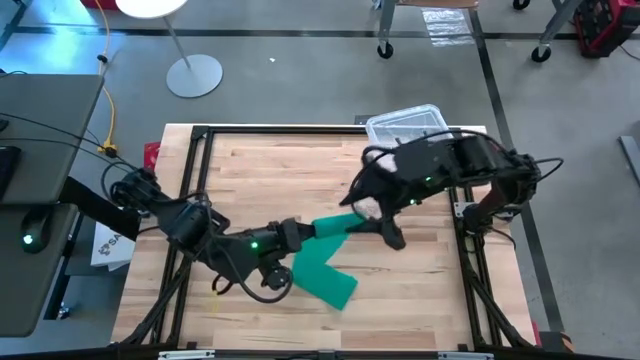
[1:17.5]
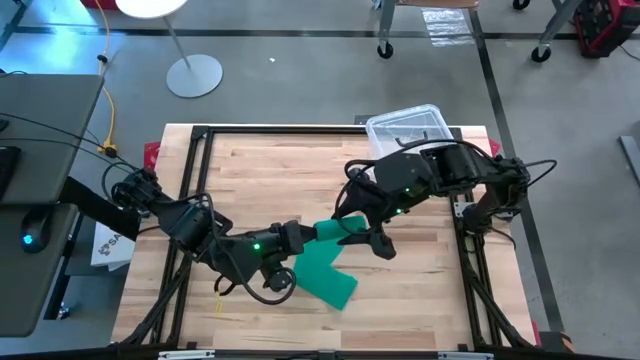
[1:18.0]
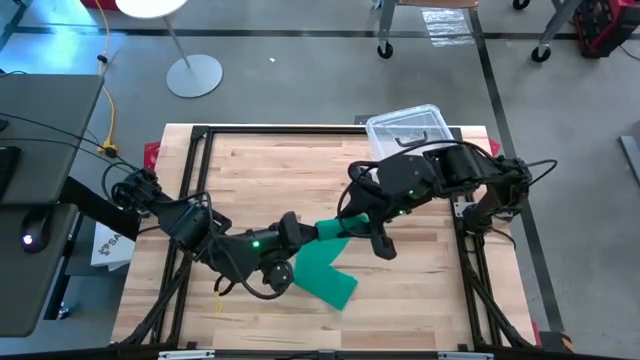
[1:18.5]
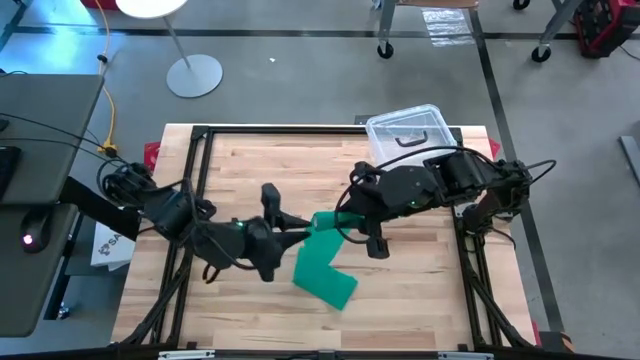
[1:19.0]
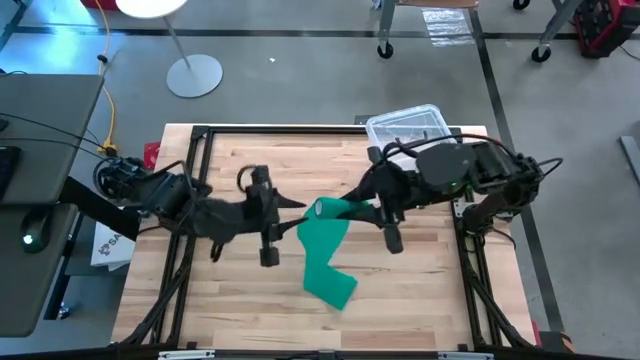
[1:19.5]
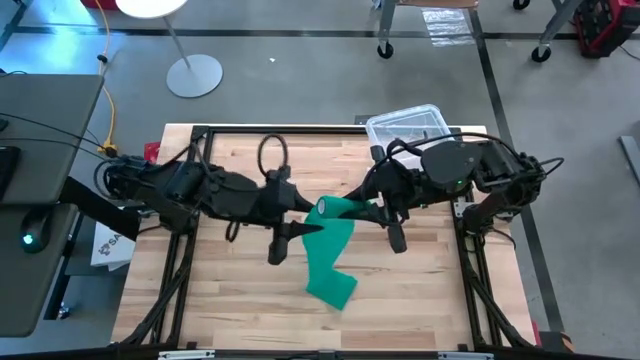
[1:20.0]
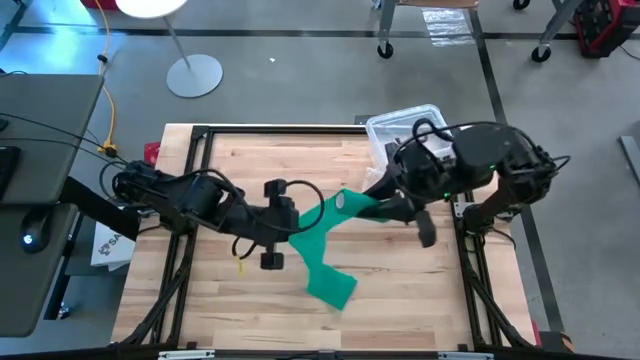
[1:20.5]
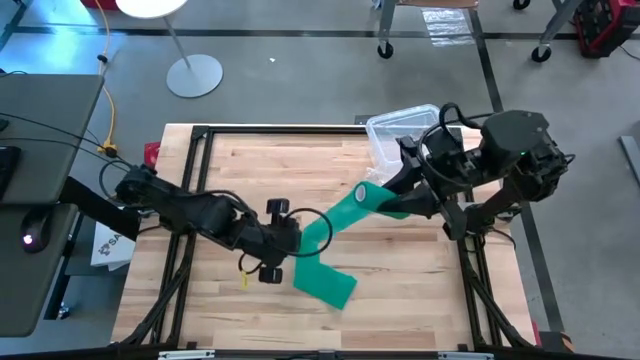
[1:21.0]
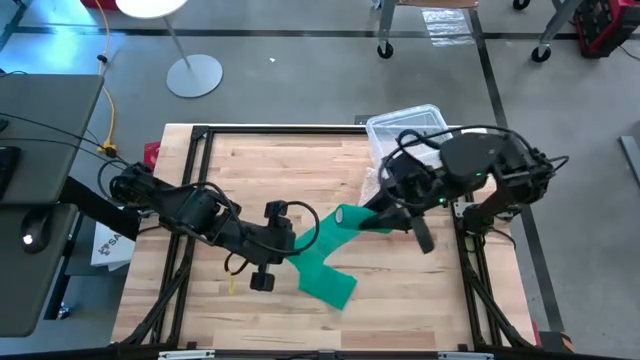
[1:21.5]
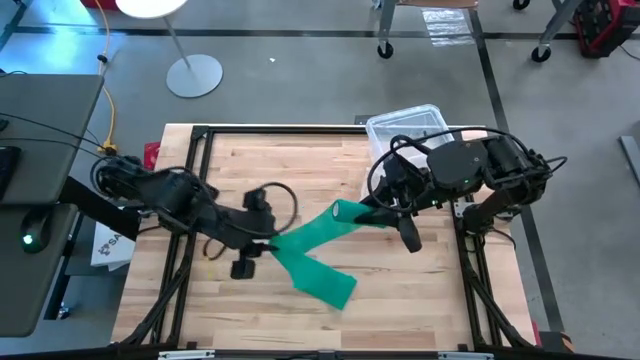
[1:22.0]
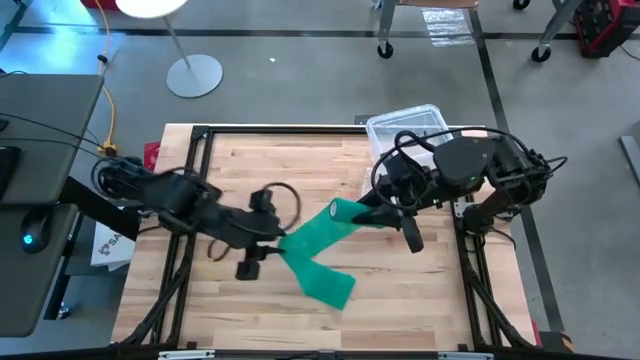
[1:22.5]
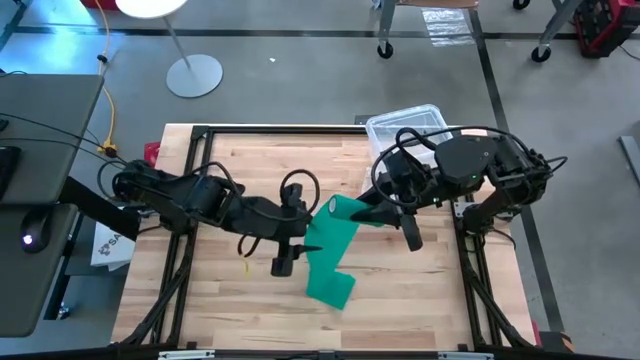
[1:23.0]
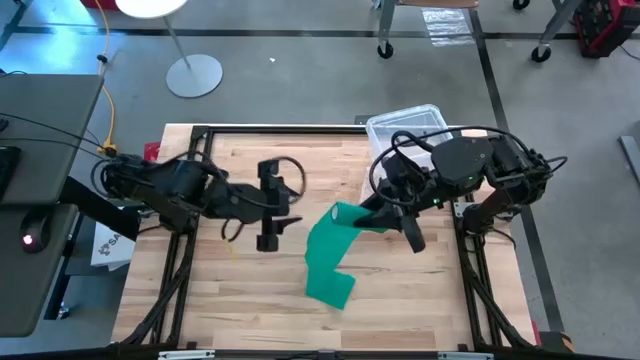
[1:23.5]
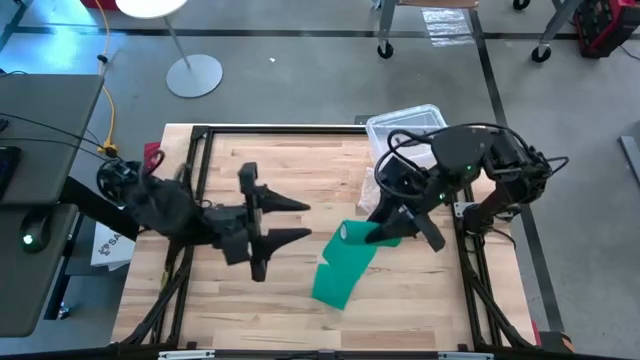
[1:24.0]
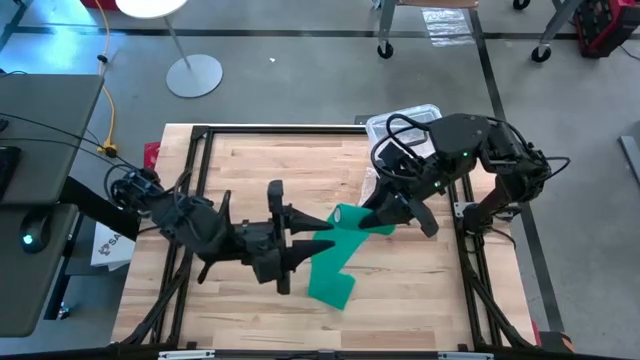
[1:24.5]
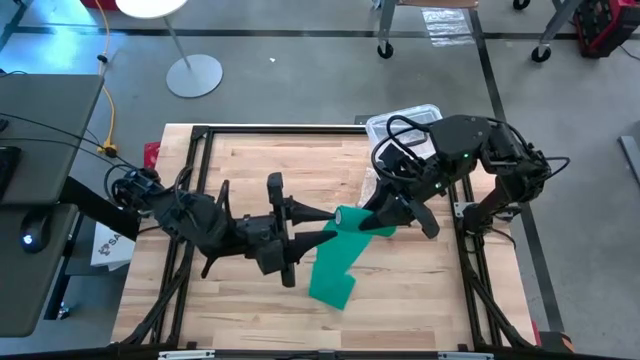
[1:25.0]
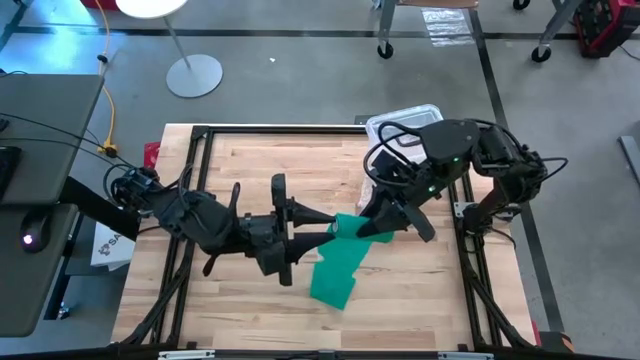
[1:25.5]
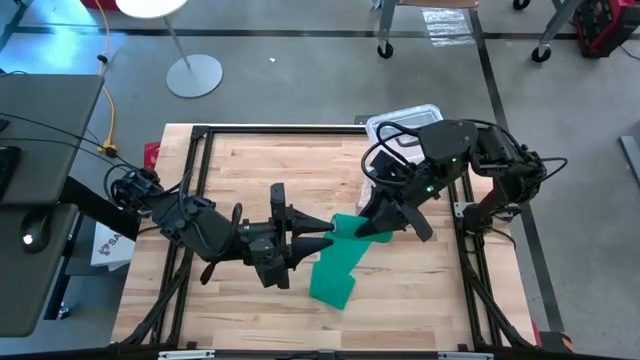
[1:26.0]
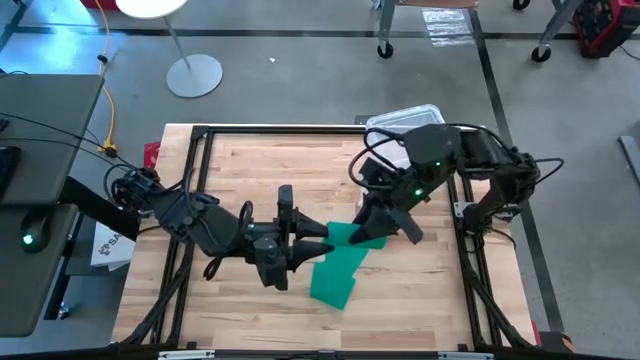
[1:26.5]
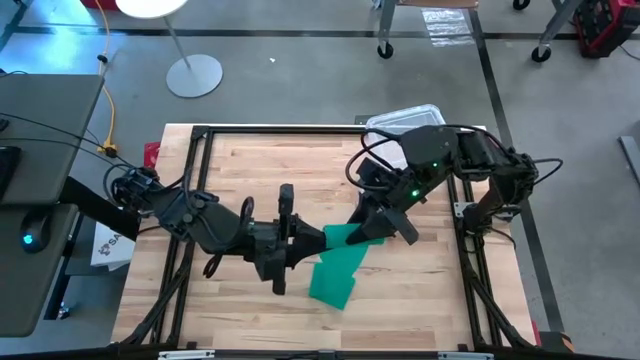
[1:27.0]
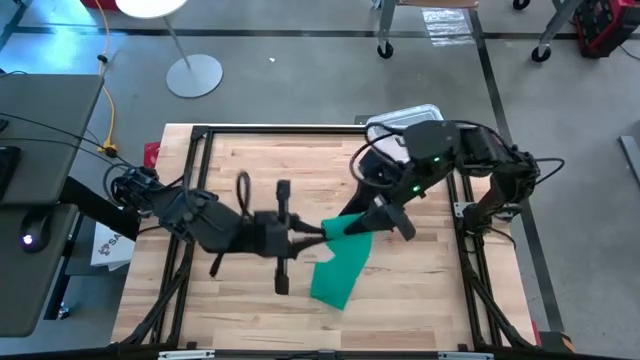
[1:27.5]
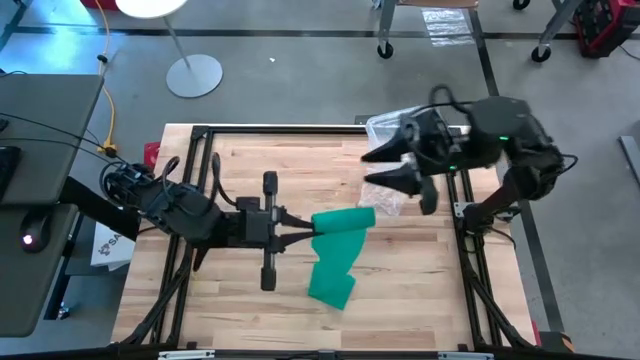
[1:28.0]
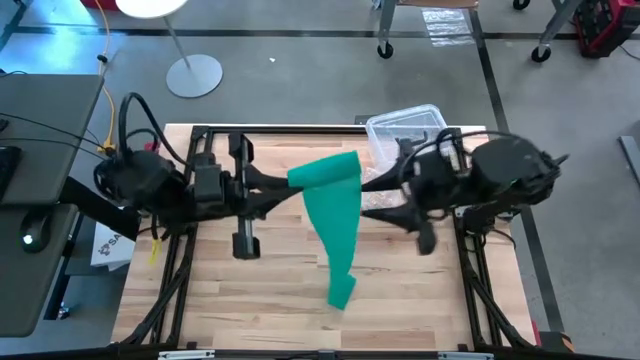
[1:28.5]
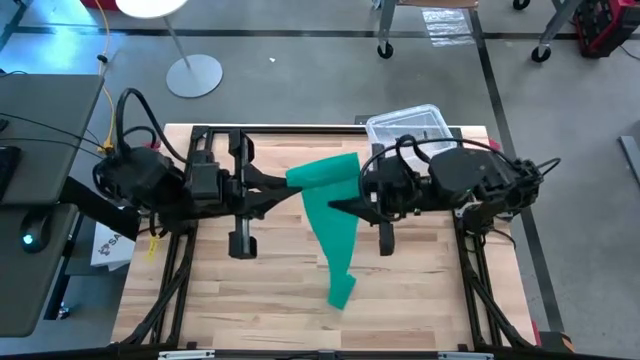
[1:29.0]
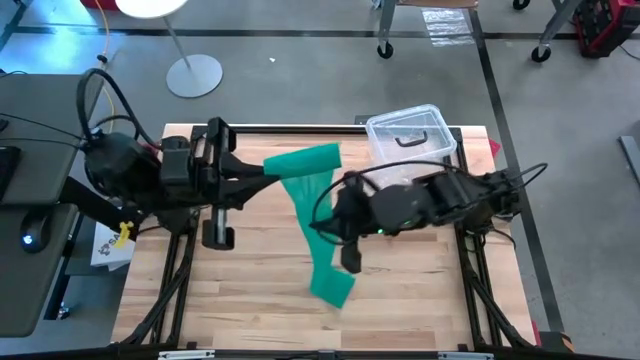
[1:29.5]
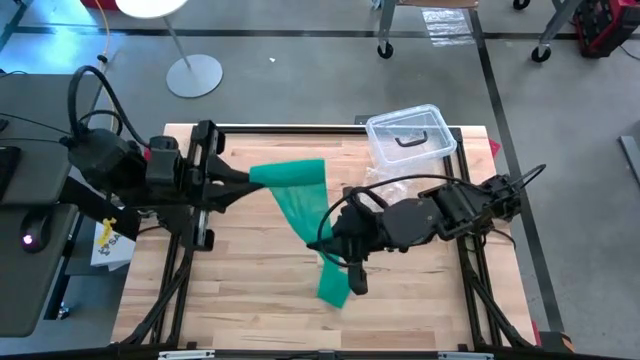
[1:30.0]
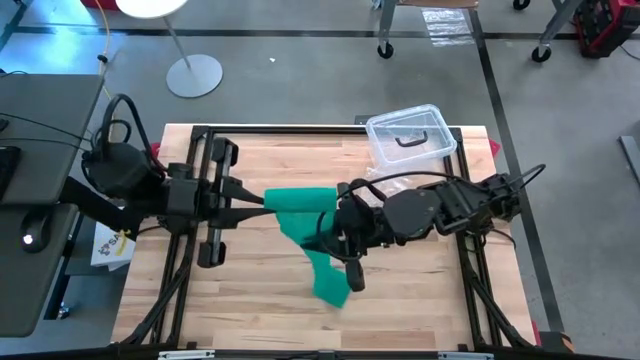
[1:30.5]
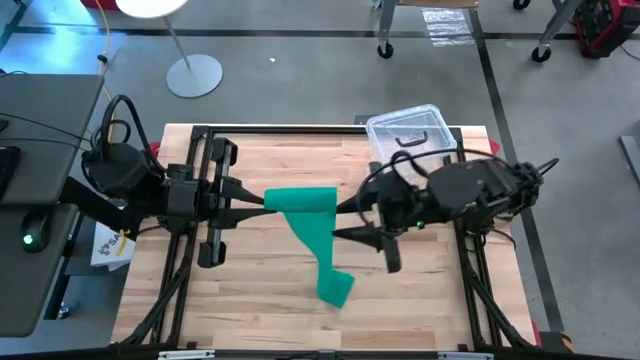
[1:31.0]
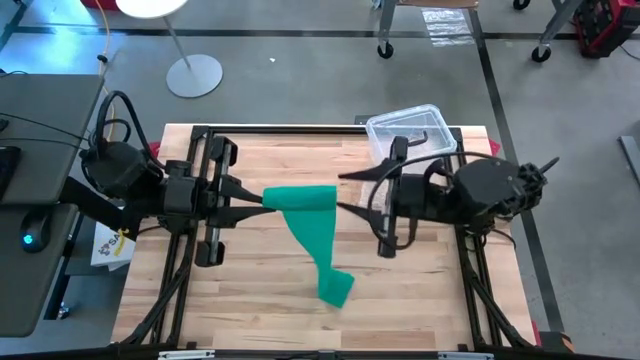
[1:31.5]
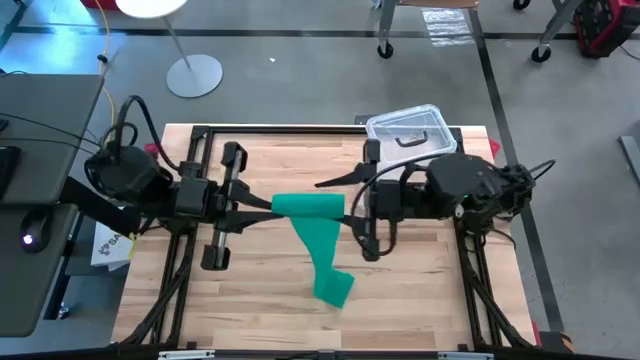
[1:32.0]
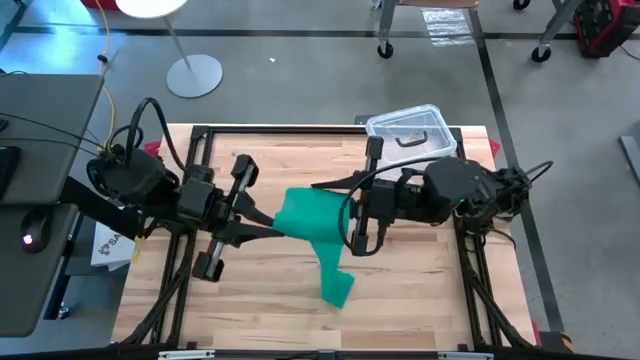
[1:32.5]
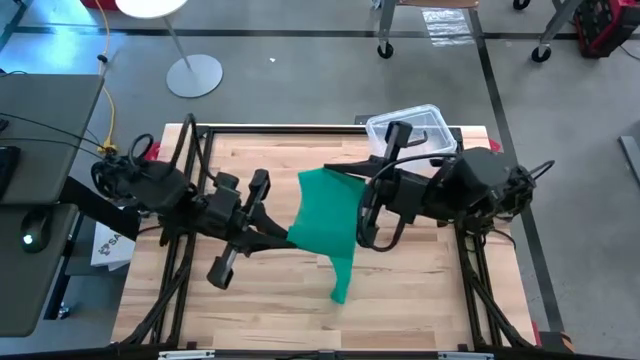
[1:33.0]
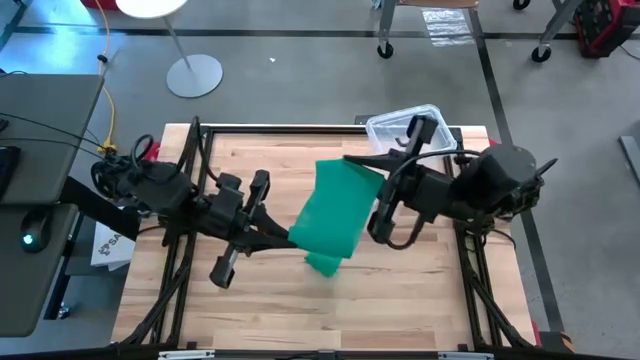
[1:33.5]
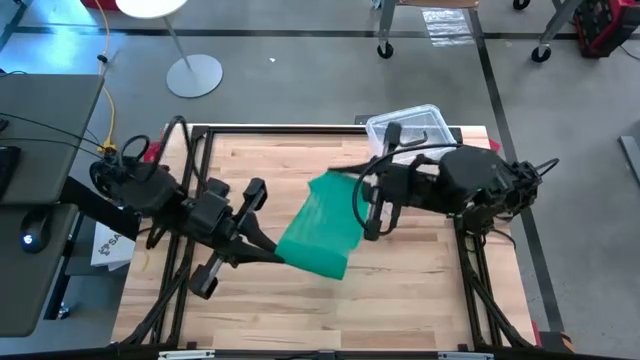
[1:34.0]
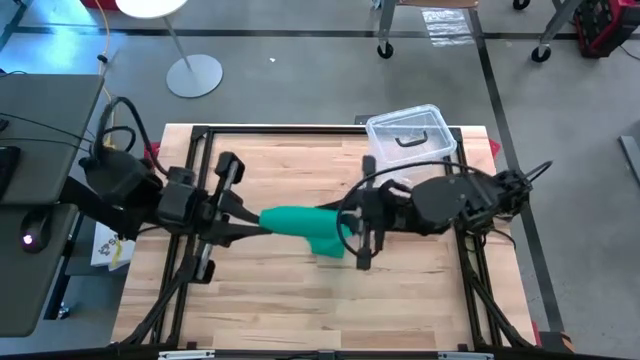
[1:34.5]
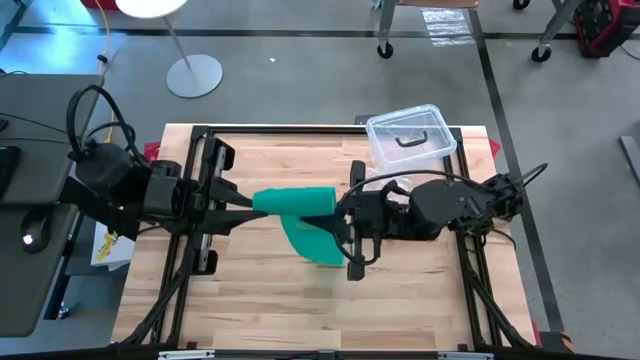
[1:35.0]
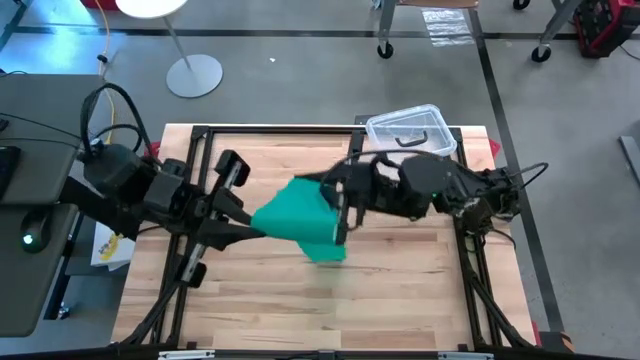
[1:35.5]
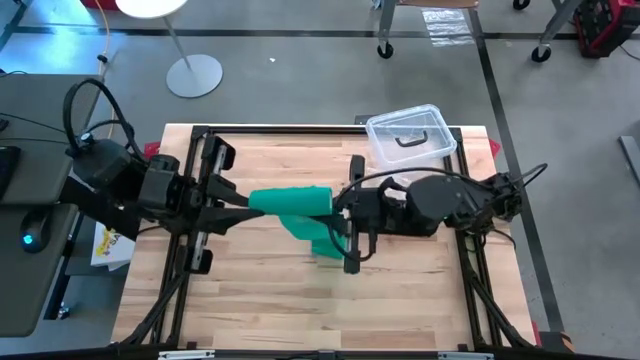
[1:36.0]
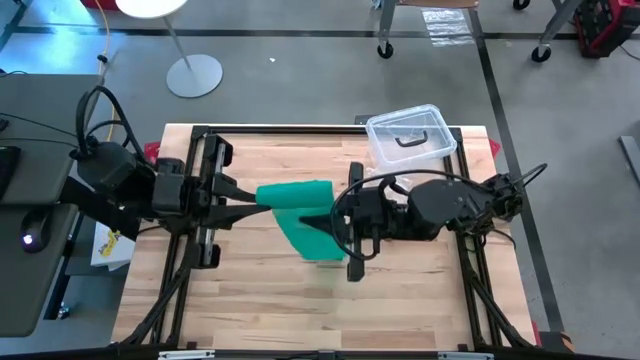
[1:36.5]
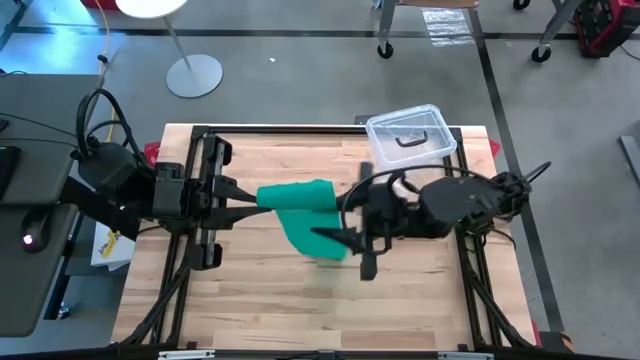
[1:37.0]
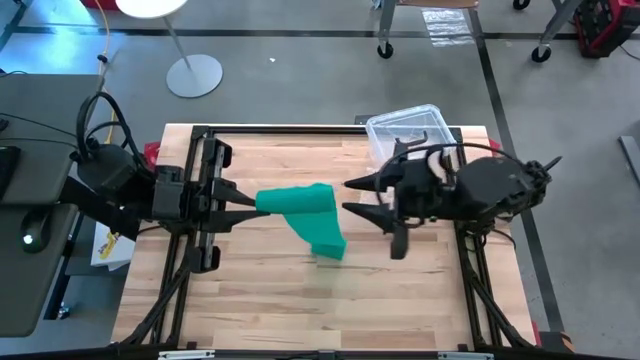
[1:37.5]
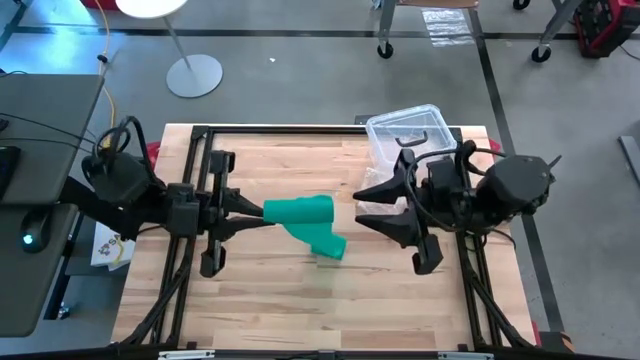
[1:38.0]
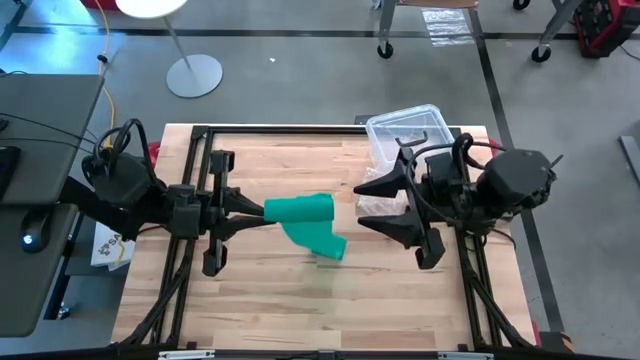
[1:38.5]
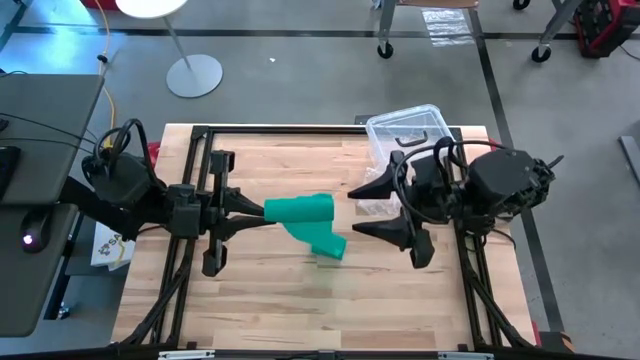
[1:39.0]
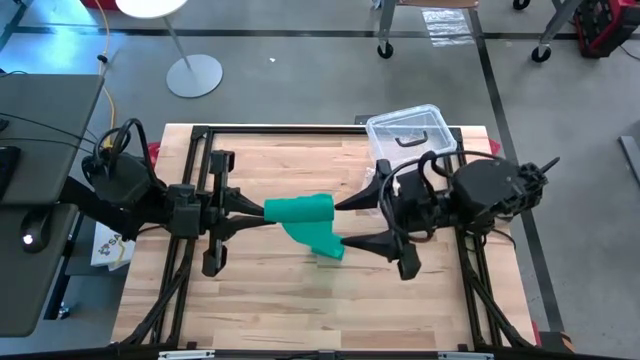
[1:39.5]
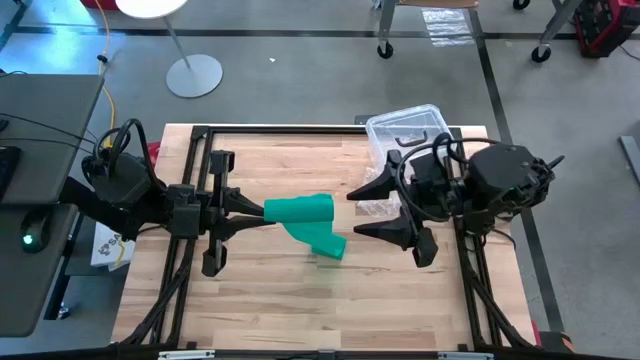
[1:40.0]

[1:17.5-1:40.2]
Task: Roll bandage
Roll the green bandage
